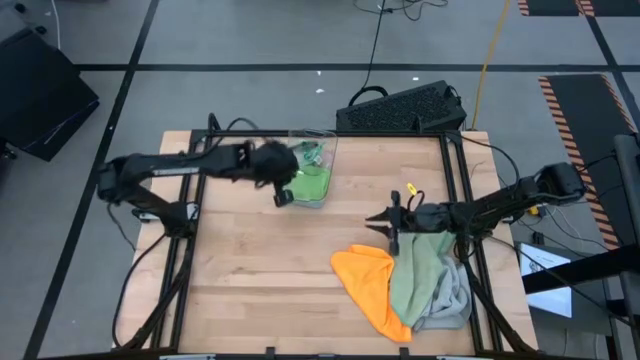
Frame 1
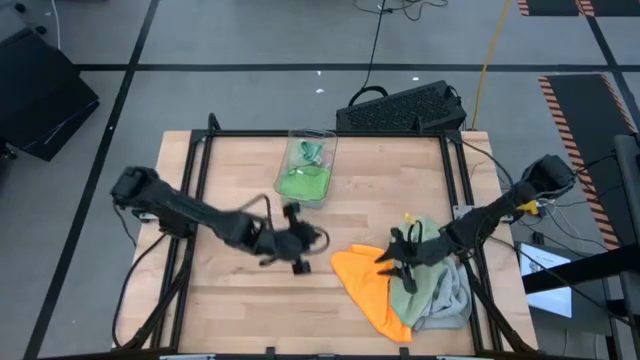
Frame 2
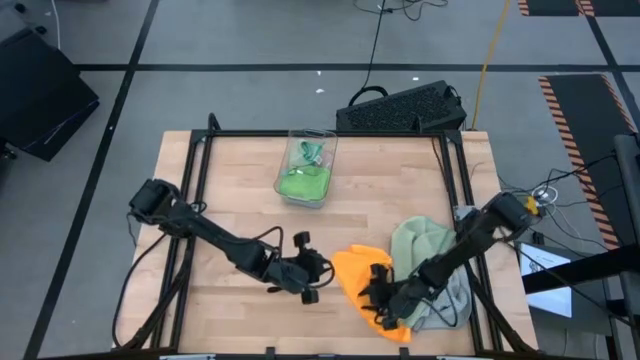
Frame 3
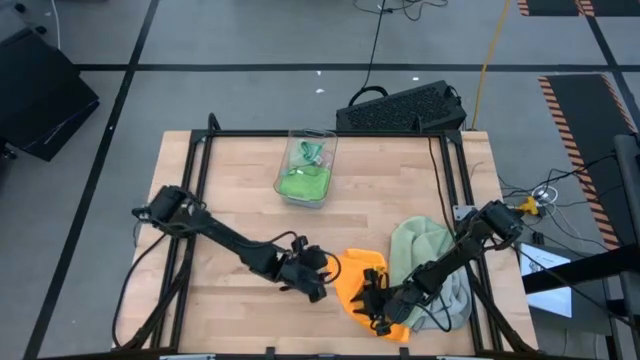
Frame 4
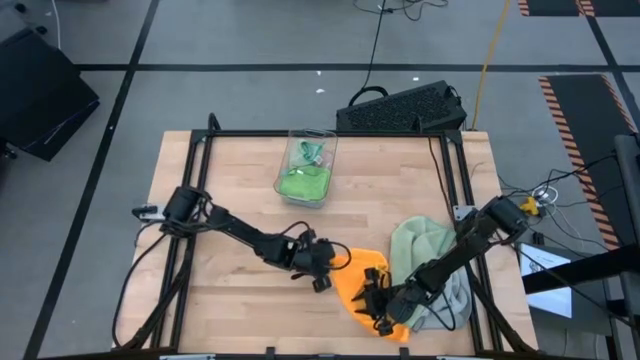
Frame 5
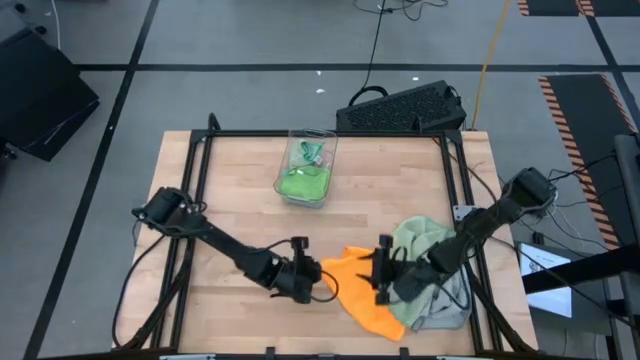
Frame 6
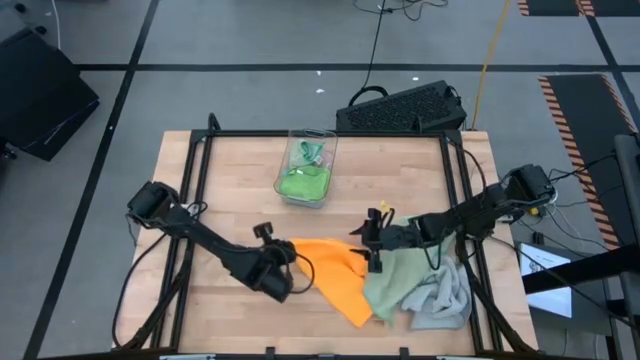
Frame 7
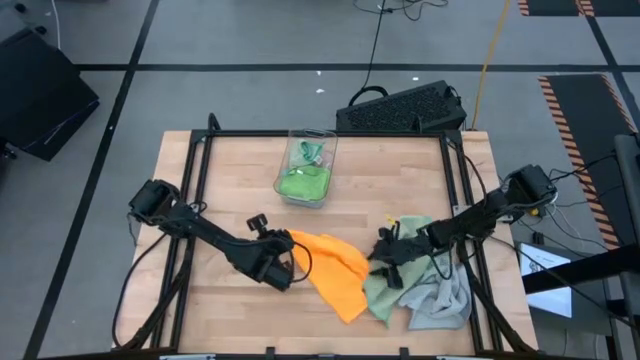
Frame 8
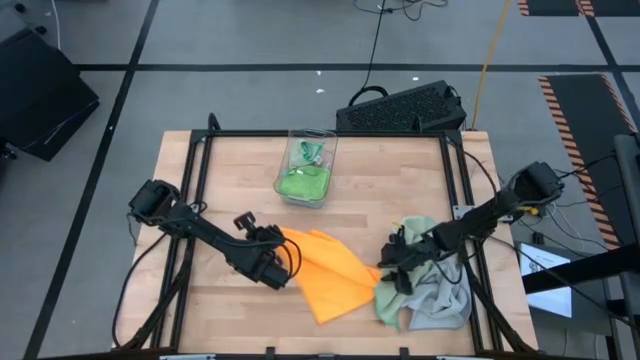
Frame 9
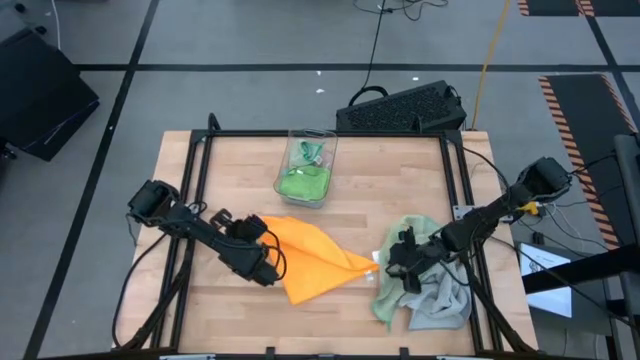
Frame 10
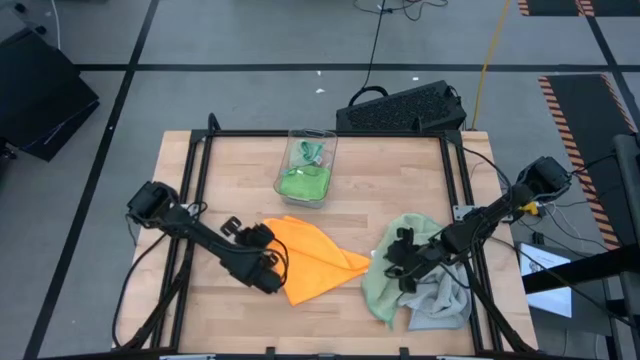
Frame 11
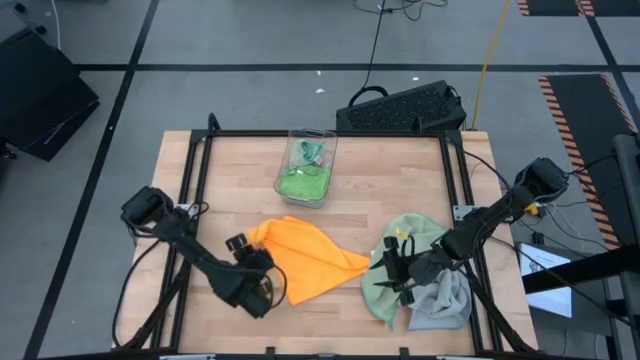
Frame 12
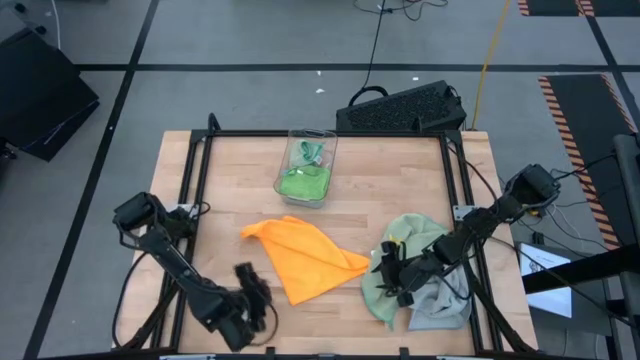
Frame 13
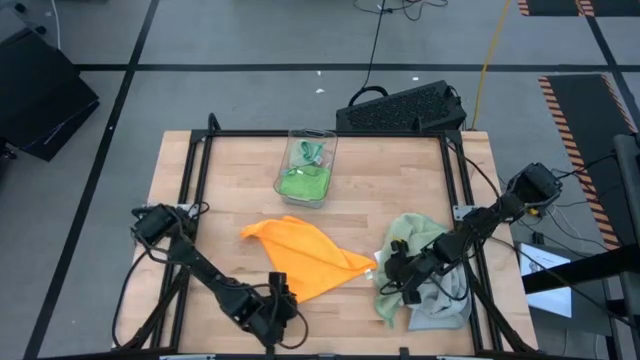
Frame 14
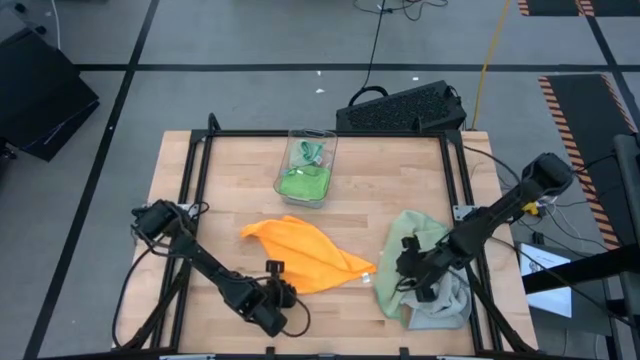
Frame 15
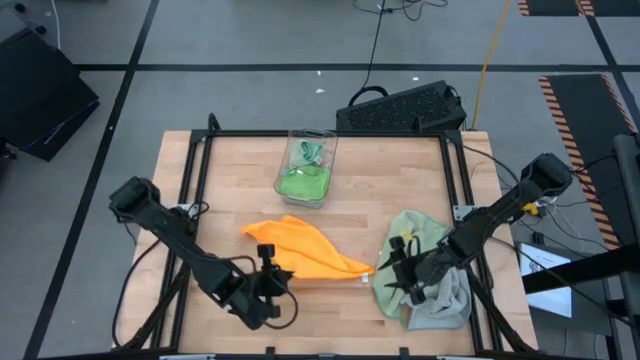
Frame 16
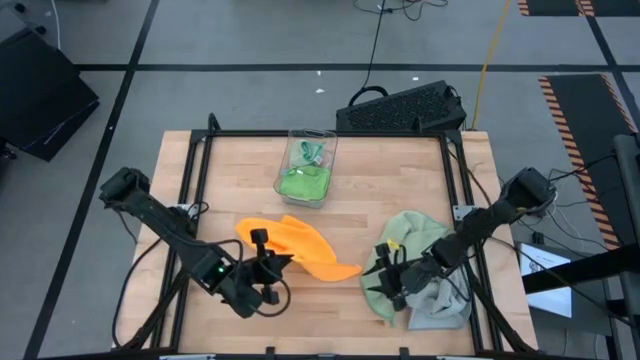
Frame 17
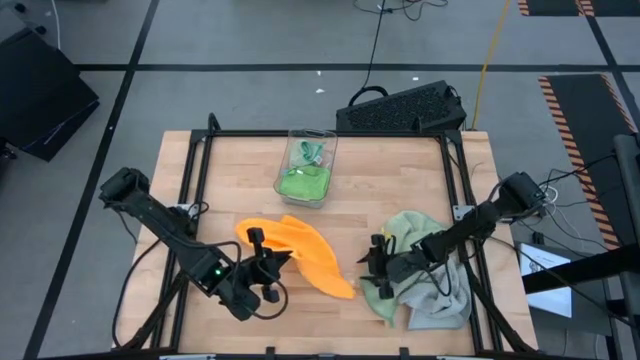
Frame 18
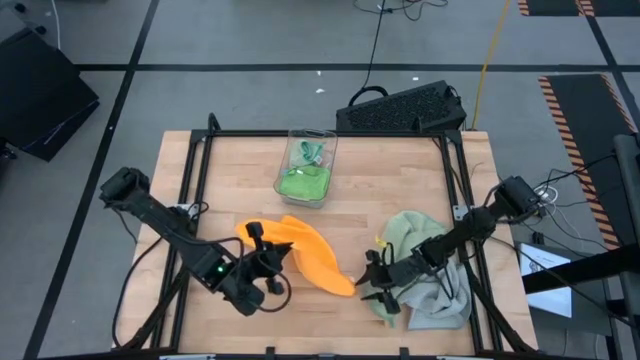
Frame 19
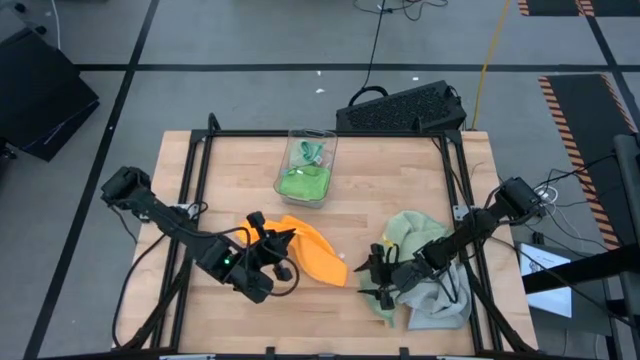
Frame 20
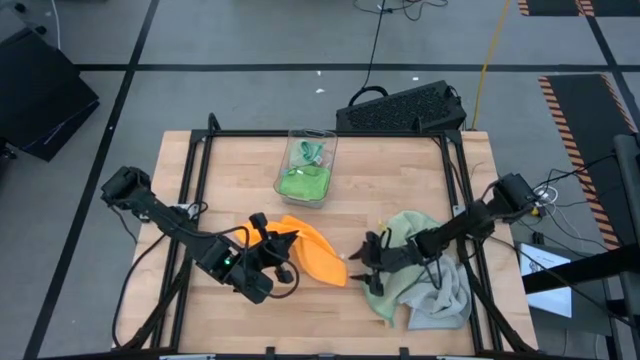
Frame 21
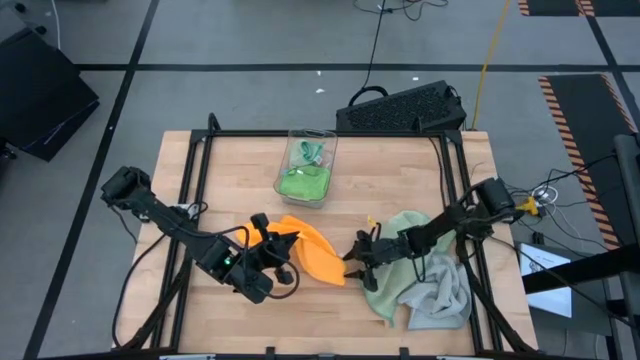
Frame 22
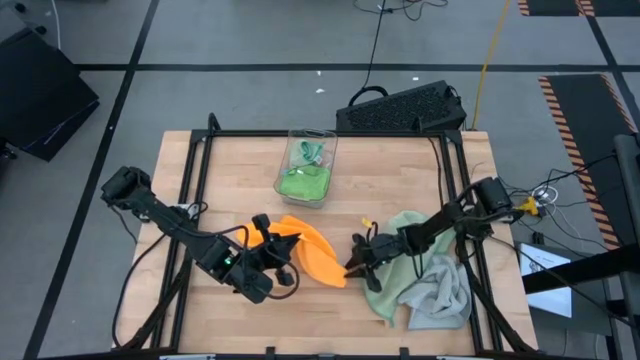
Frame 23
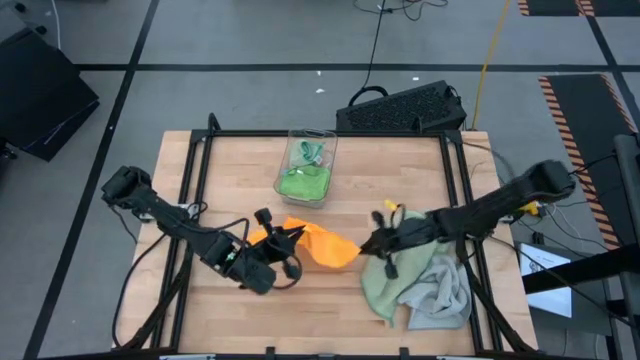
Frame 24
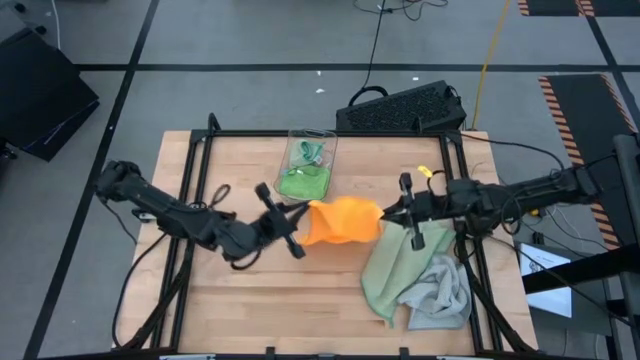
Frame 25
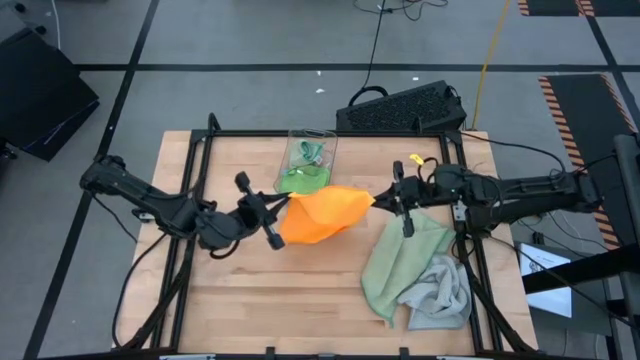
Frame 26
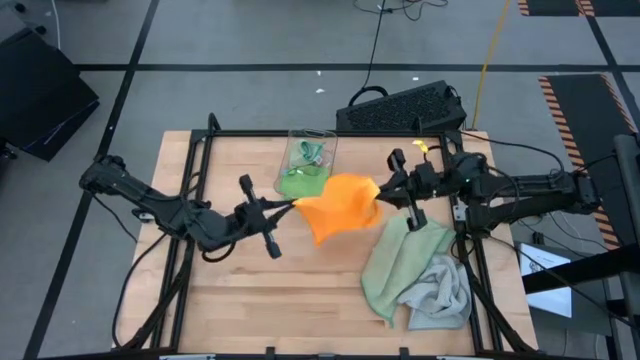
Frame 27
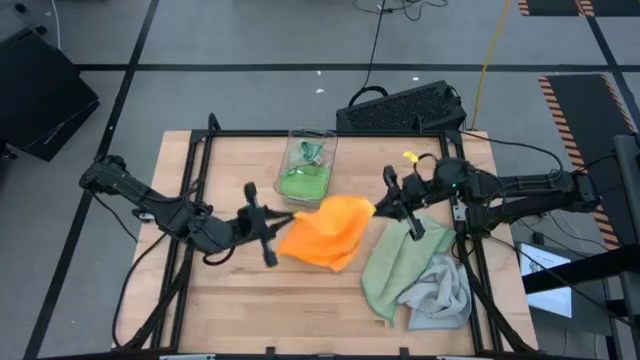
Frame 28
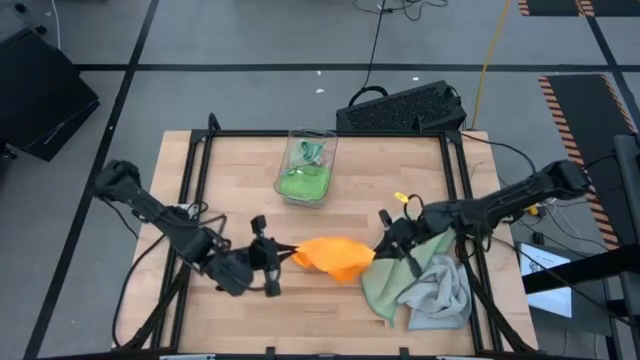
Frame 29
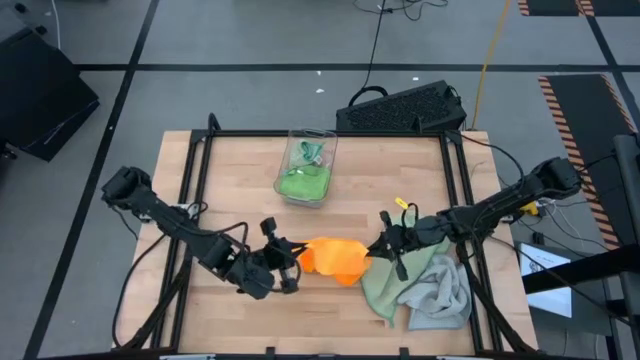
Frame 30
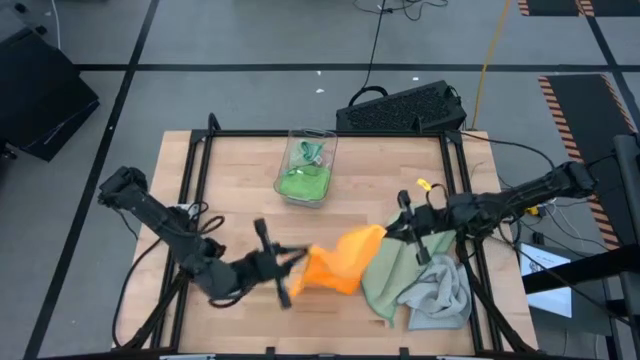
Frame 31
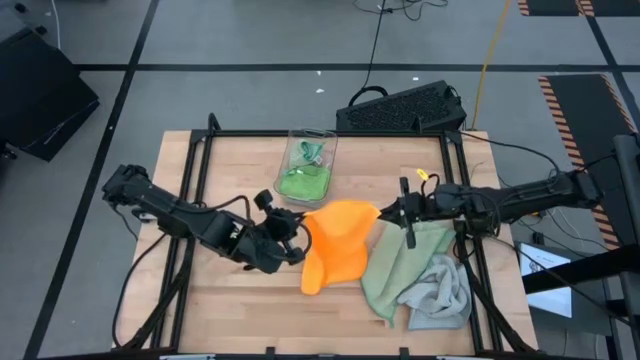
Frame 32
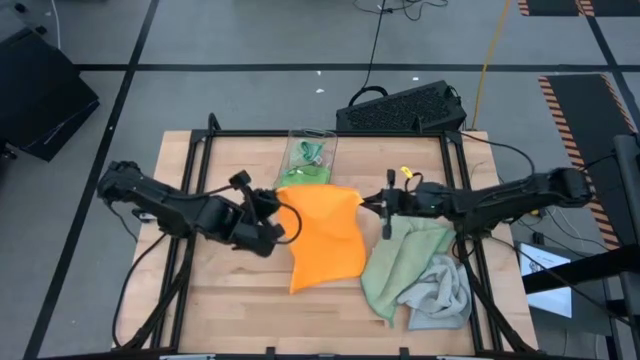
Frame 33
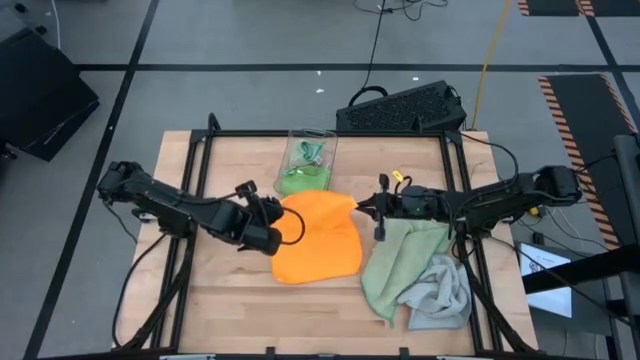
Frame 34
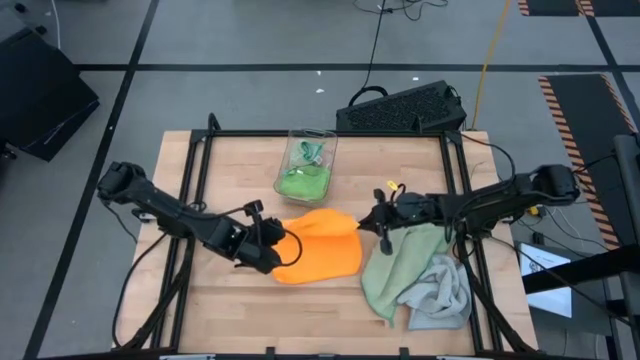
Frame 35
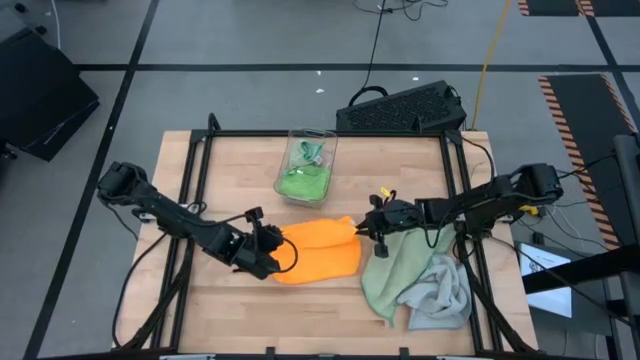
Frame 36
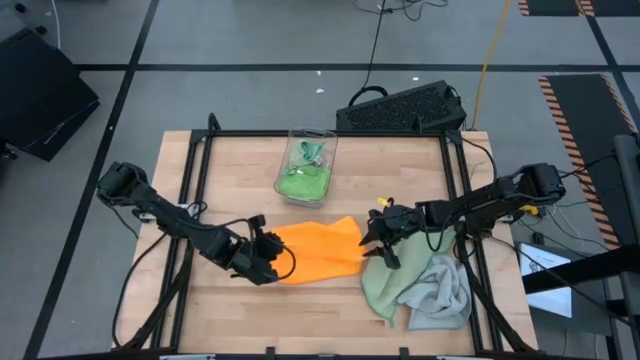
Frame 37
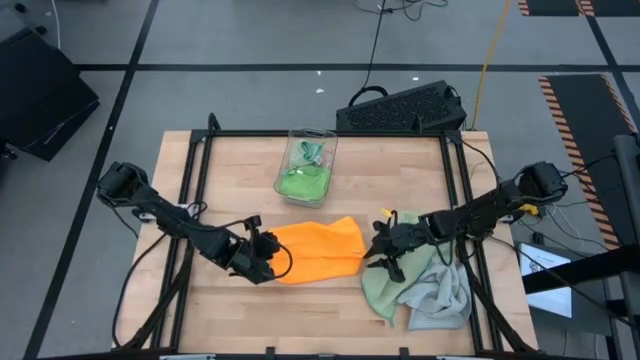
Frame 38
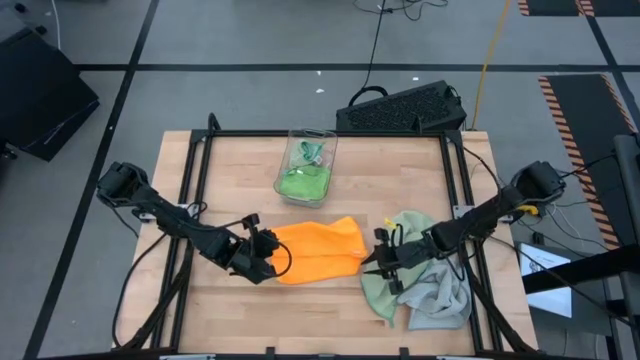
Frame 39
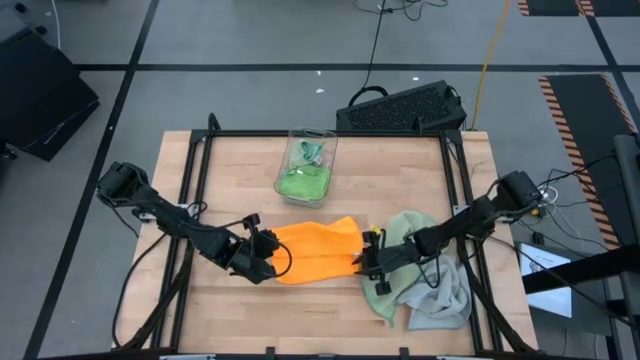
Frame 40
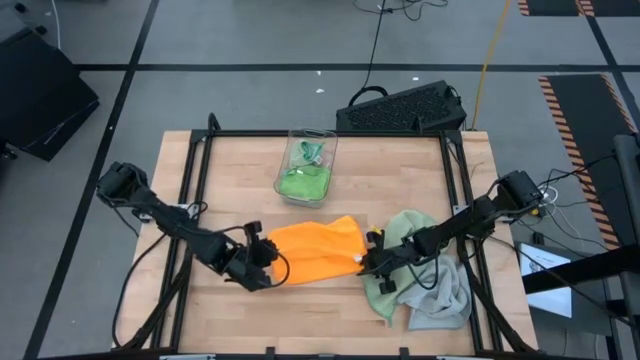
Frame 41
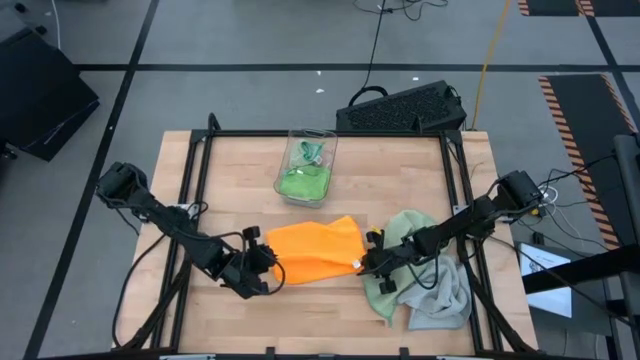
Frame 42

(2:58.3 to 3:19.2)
Task: Fold microfiber towels
Fold the yellow towel
